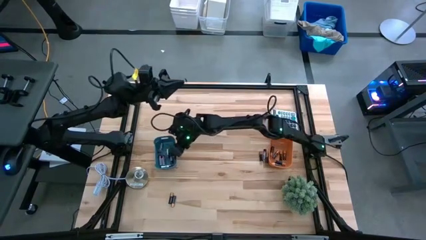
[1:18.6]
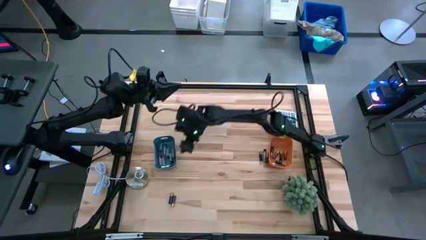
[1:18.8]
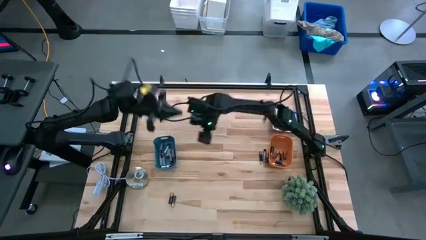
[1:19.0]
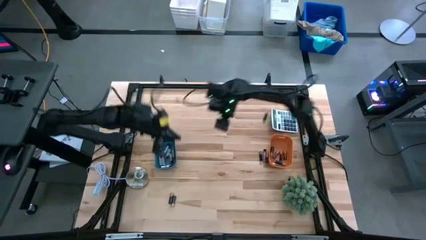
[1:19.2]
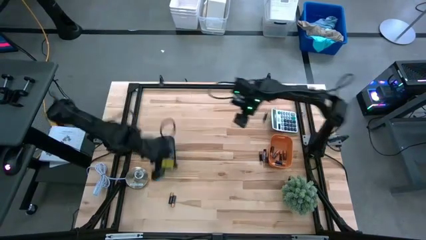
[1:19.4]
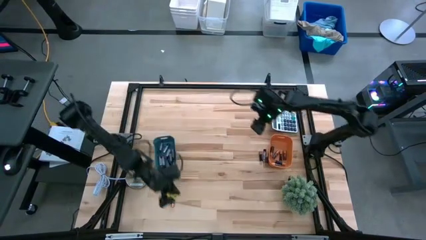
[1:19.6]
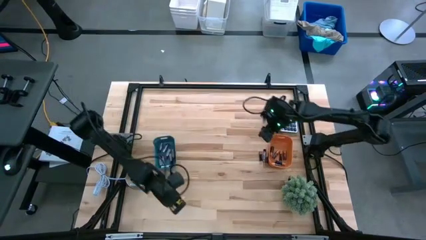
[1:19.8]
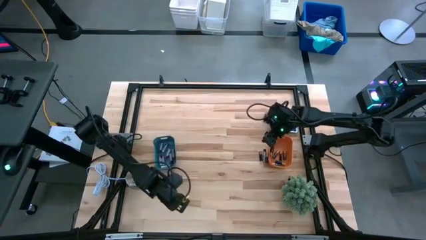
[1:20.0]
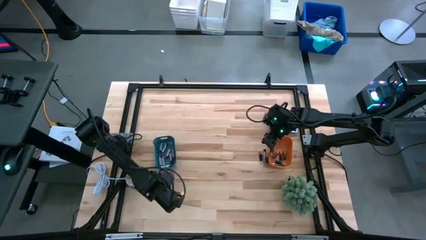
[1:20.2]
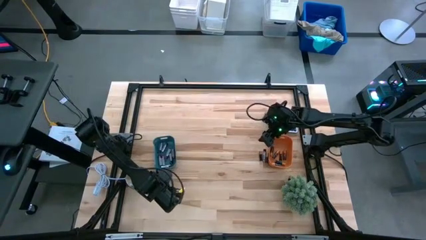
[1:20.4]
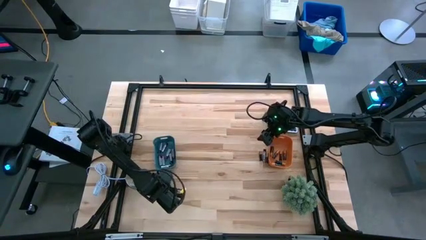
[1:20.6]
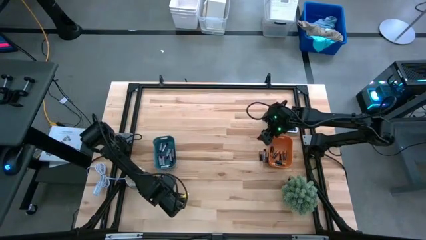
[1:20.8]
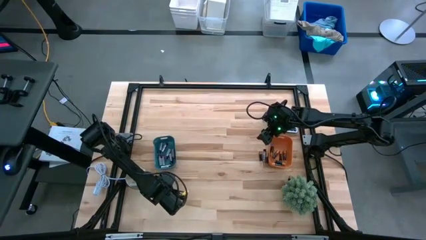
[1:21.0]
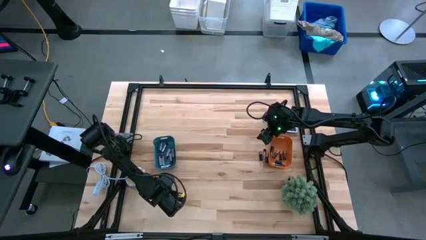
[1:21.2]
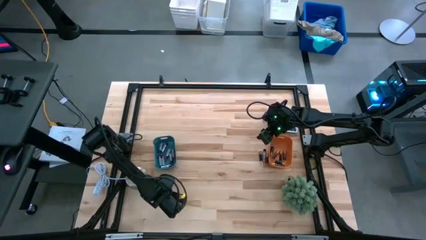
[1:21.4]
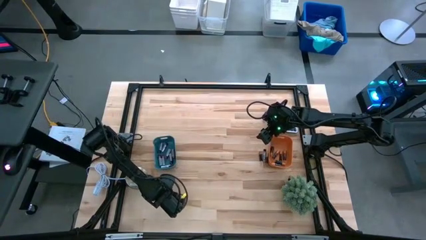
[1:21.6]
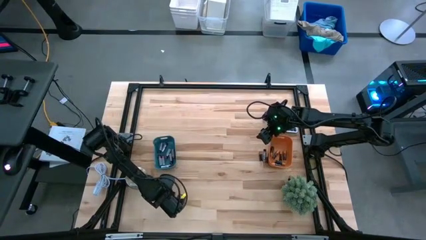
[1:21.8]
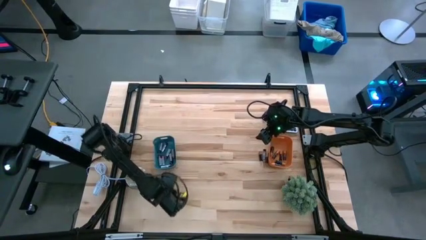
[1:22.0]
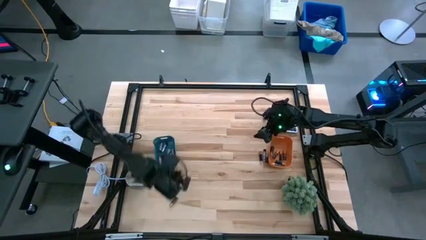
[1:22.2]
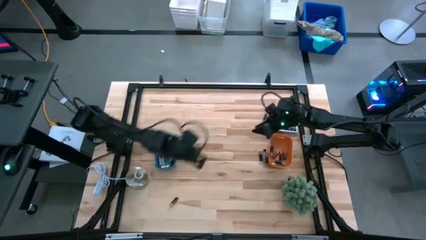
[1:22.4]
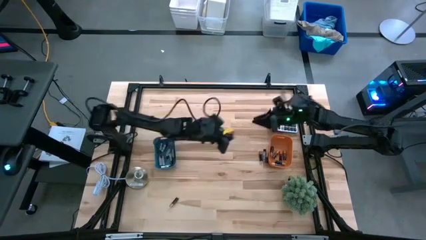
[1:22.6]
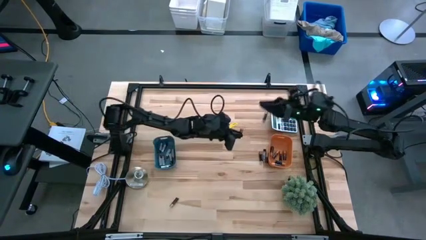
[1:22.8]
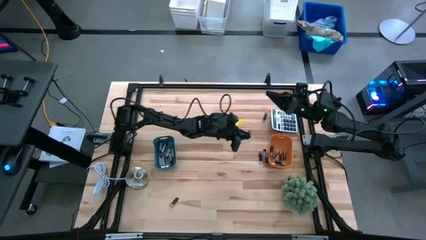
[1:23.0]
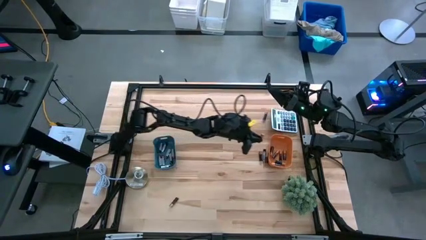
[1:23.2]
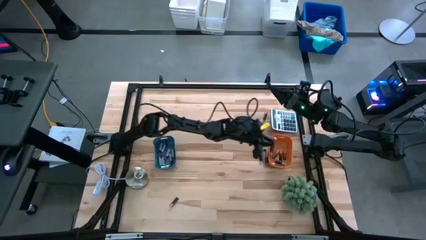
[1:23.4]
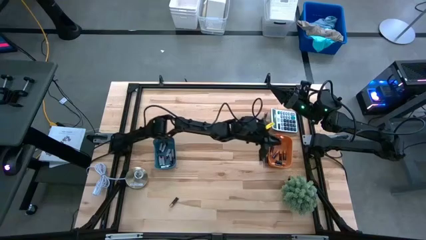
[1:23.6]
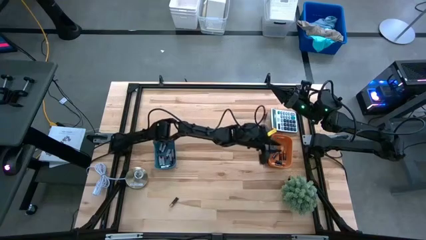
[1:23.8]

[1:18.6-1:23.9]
Task: Sort batteries
Put the black battery into the orange bin

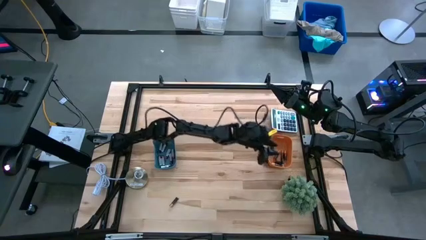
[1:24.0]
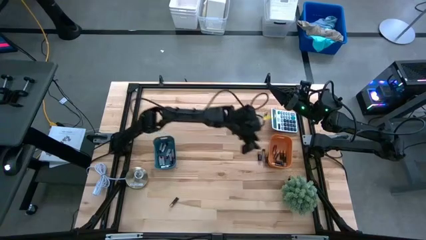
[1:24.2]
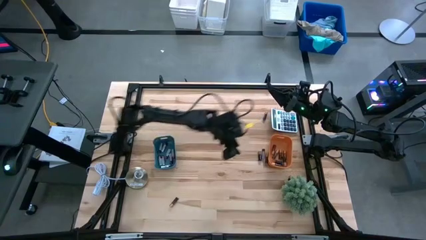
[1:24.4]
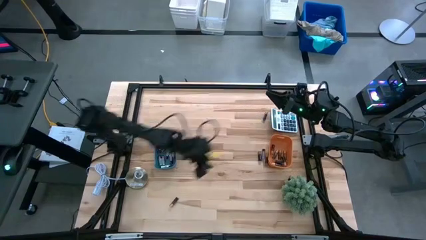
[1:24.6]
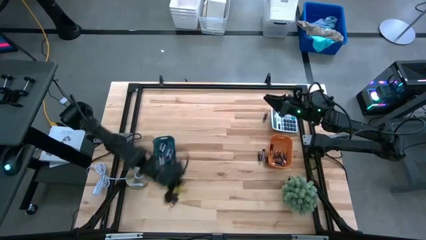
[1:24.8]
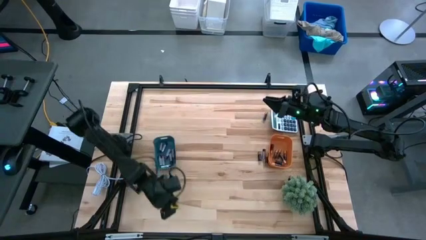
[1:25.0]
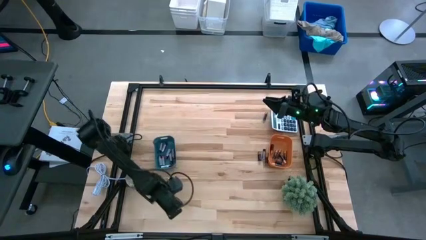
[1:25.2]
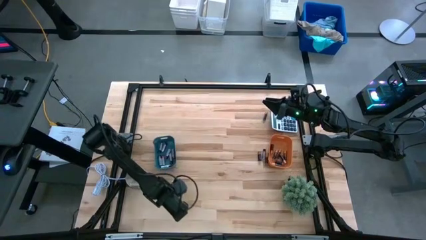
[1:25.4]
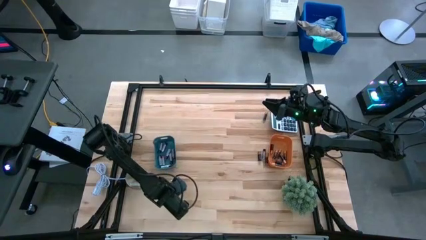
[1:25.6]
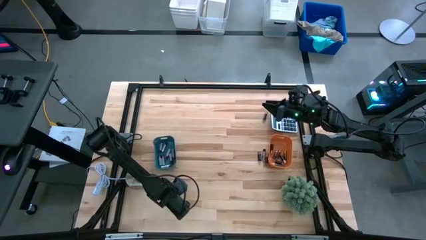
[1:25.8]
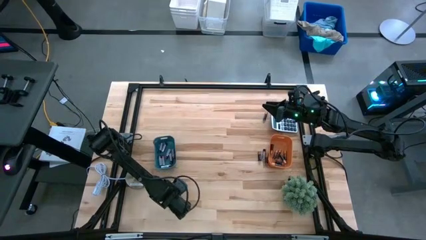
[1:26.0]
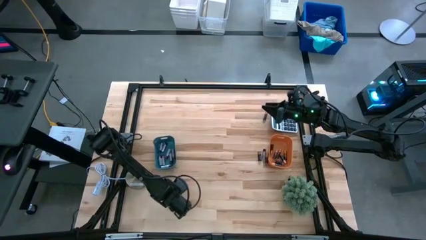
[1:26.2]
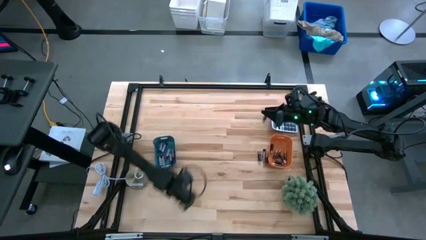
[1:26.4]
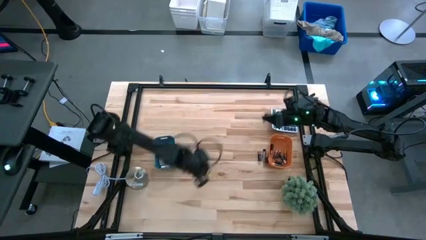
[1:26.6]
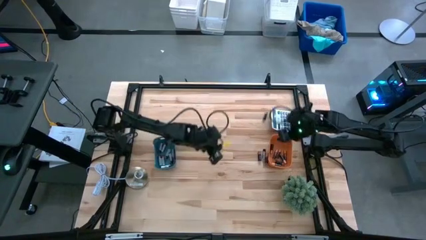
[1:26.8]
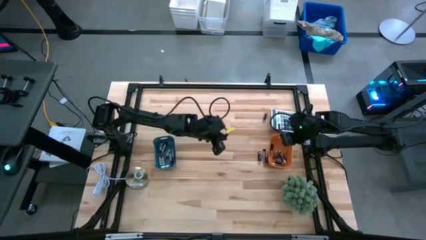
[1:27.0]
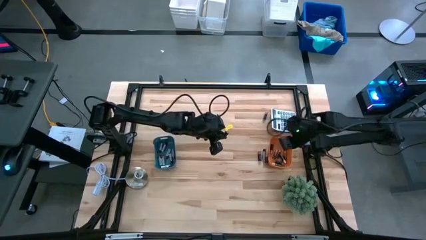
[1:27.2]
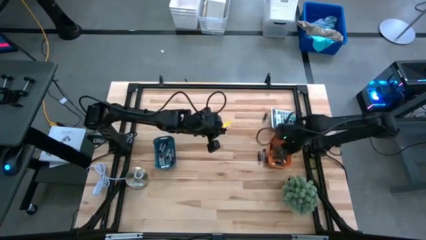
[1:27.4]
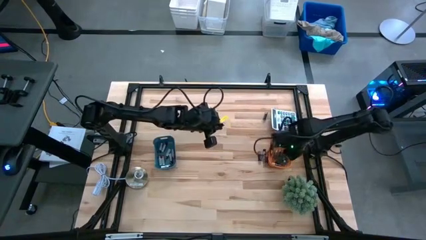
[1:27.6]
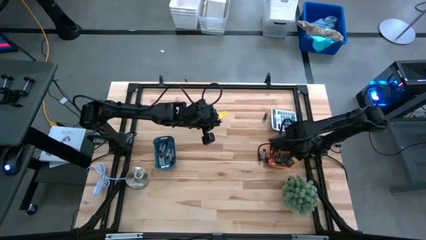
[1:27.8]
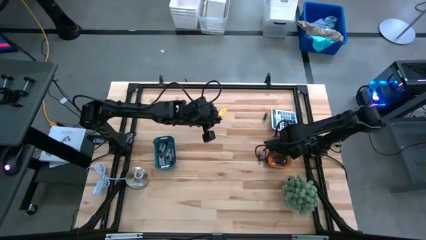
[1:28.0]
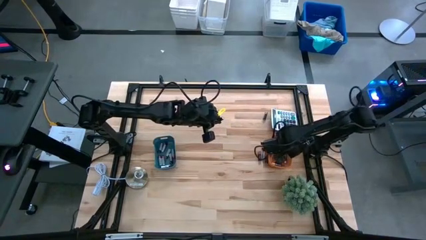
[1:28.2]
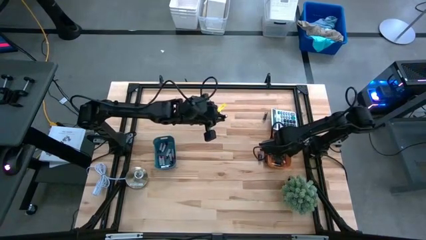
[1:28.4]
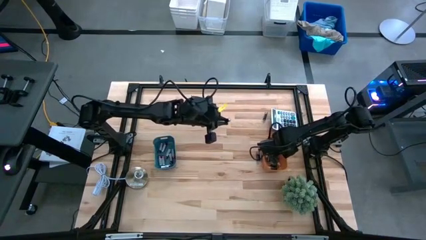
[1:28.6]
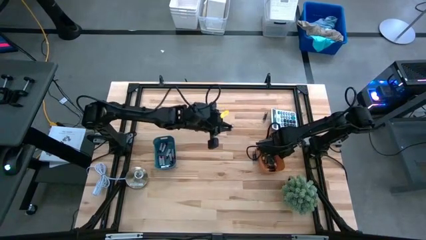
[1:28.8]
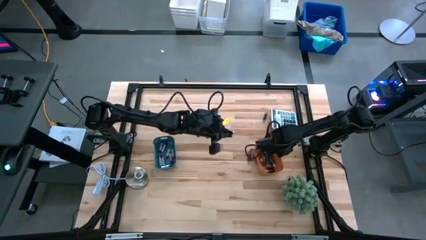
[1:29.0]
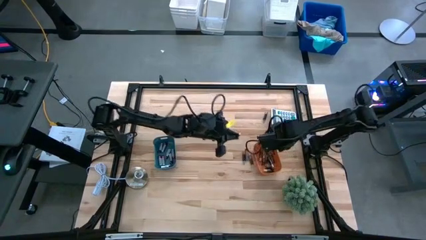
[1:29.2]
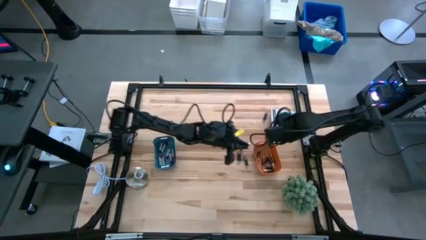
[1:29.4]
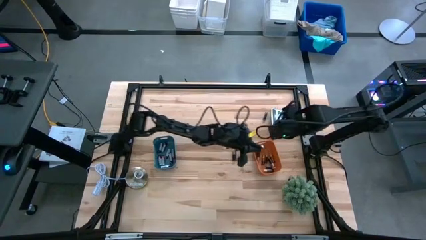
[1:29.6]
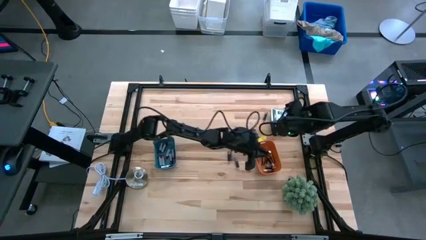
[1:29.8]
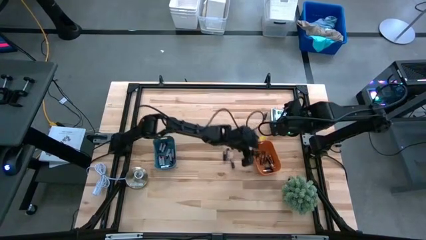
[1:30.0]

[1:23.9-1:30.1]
Put the black battery into the orange bin

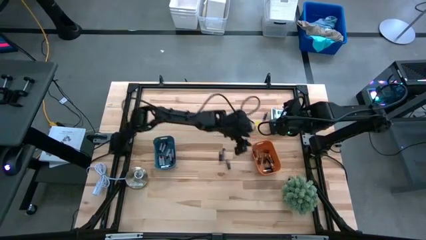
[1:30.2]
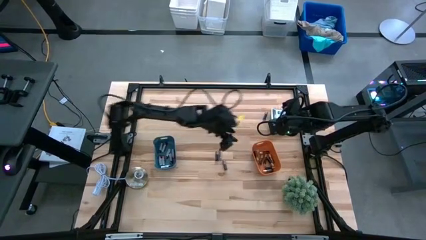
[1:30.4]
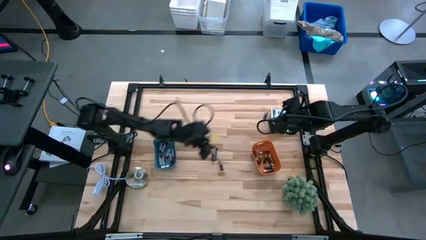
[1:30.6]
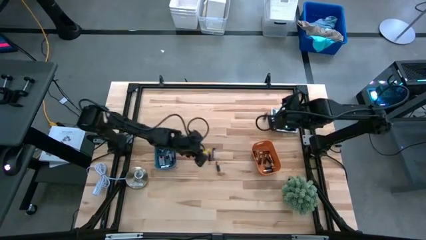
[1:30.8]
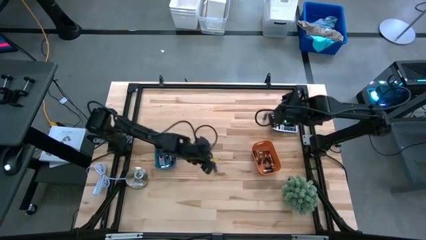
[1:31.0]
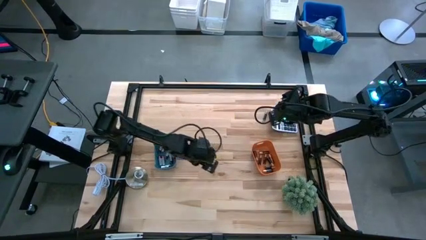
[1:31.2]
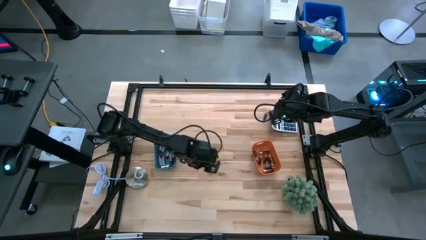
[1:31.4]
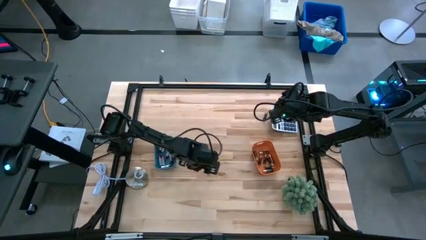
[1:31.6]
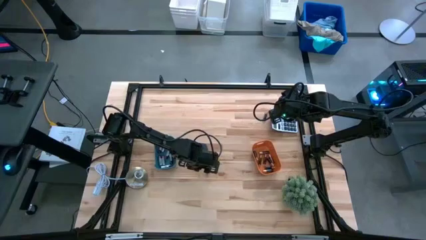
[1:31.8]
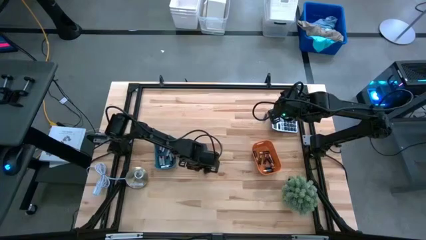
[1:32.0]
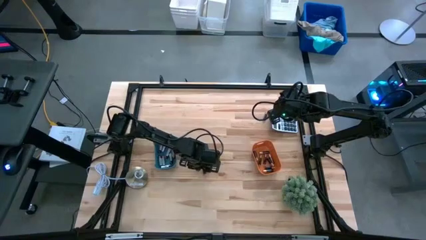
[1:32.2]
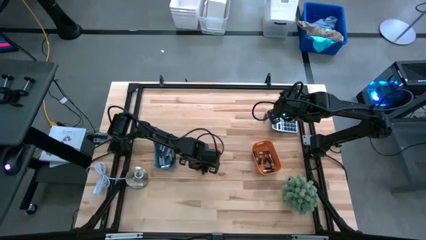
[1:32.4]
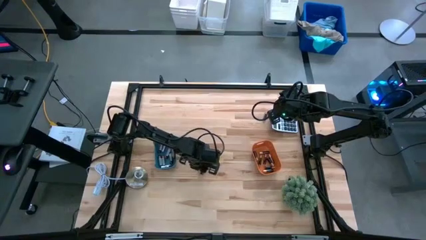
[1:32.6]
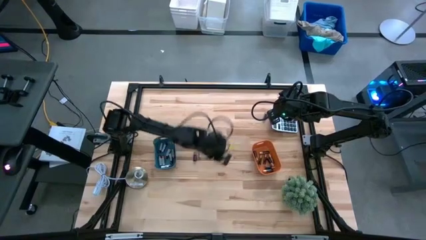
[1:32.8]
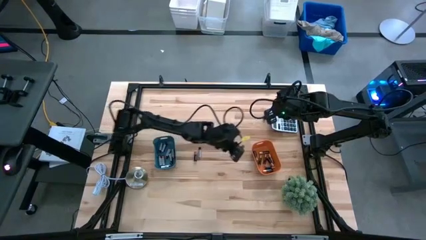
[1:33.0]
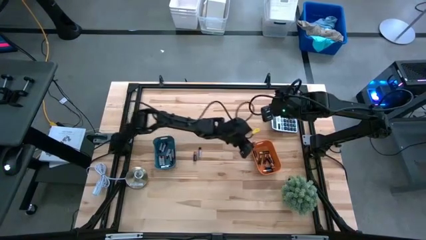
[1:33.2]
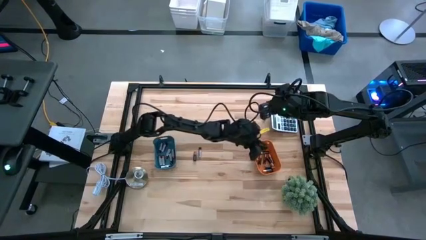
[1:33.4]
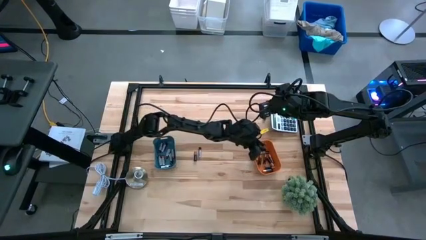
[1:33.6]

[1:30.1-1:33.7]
Put the black battery into the orange bin

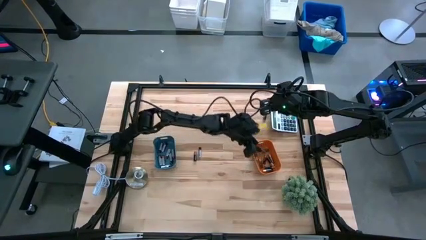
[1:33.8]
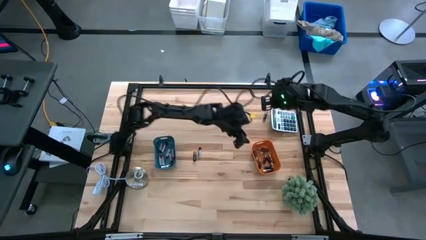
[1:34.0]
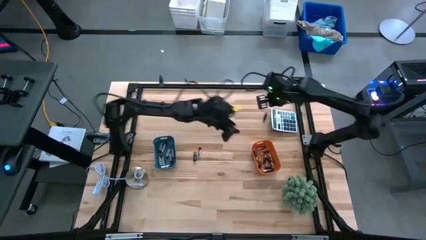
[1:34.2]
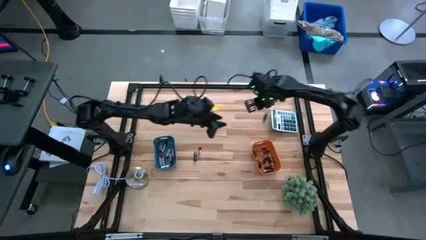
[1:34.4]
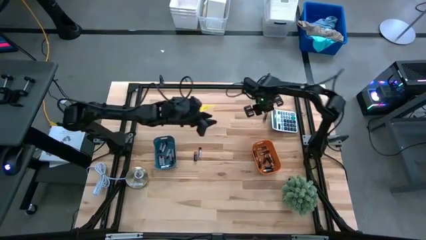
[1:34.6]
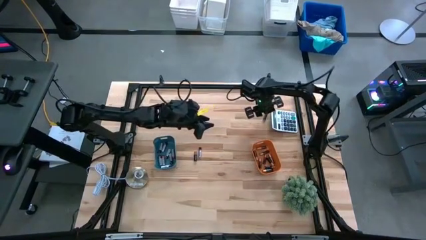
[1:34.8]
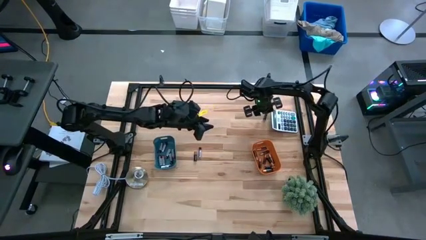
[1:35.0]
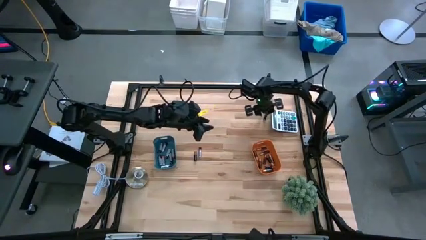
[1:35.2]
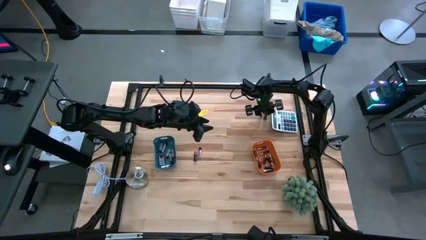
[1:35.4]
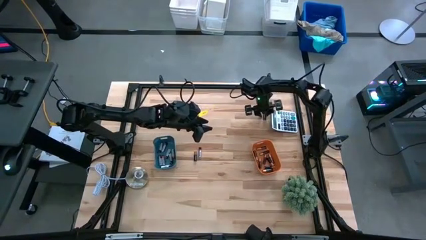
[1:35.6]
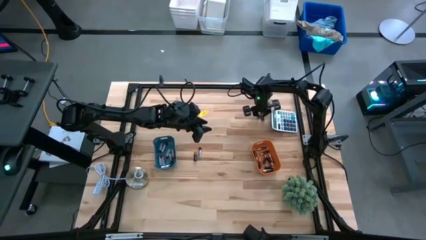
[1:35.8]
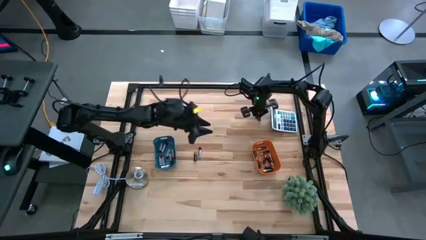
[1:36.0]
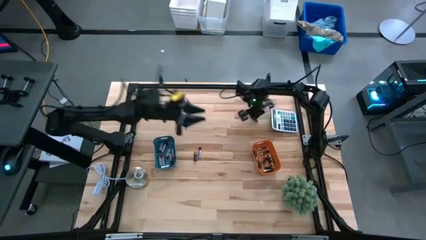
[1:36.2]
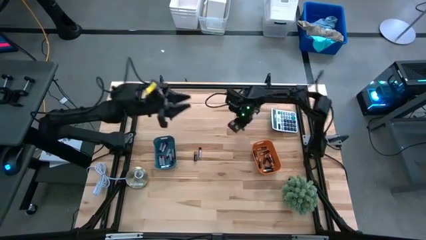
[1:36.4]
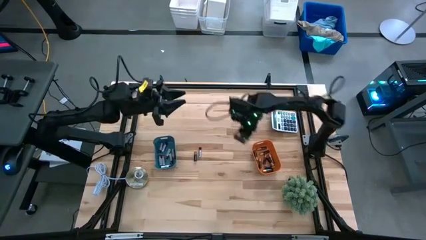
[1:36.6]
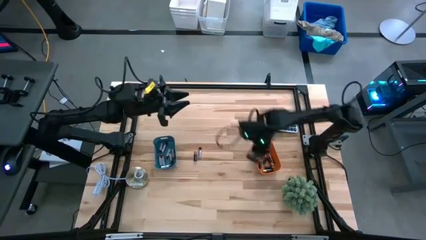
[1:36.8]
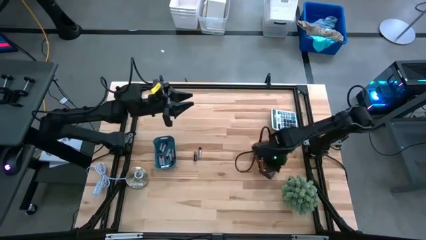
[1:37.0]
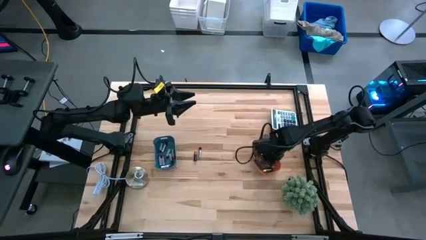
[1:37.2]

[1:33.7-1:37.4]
Put the black battery into the orange bin
